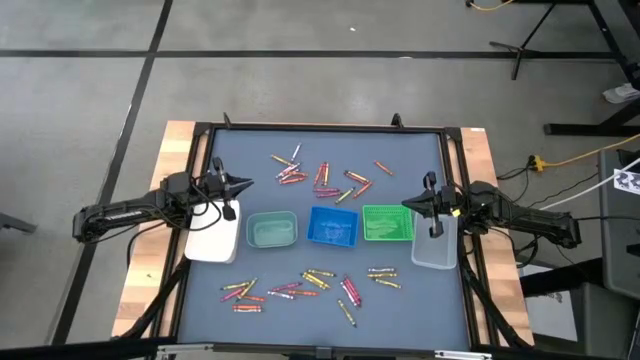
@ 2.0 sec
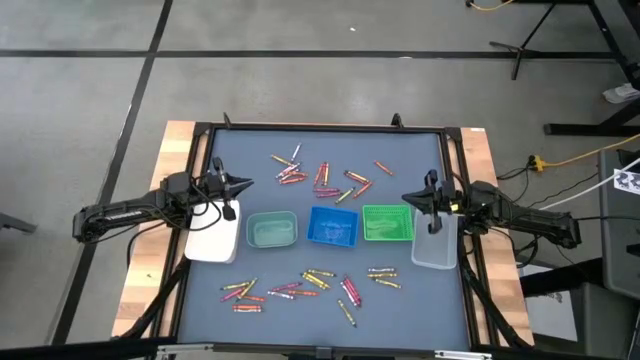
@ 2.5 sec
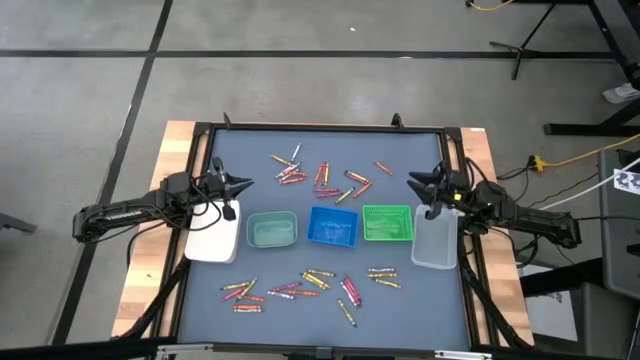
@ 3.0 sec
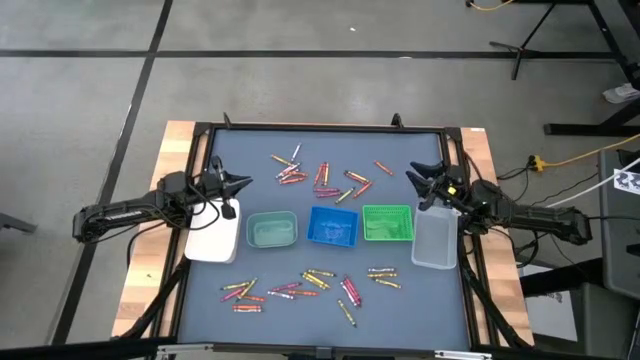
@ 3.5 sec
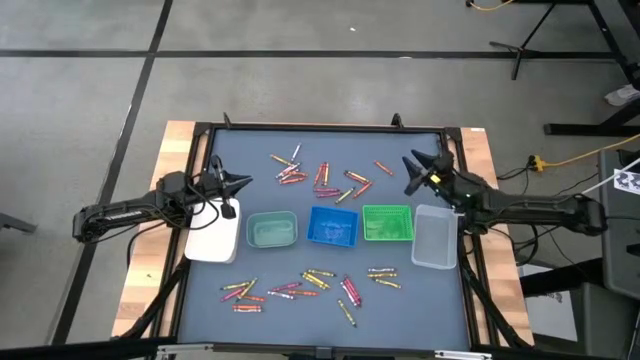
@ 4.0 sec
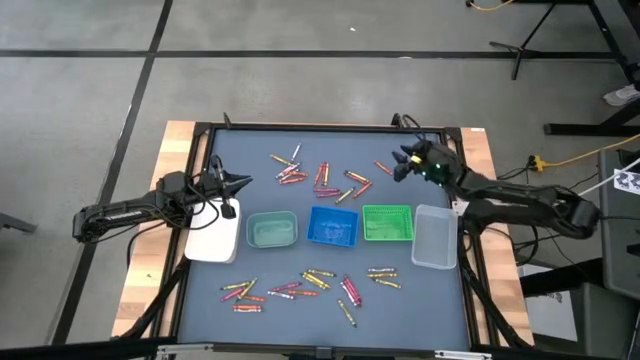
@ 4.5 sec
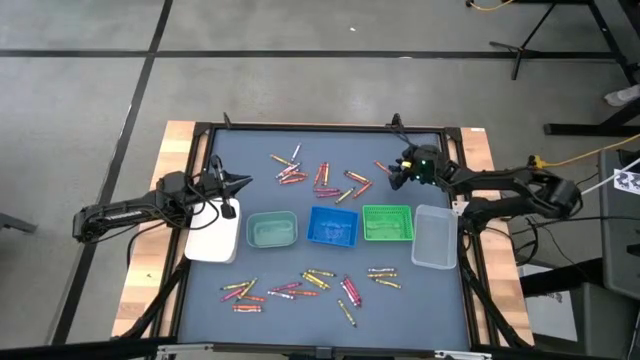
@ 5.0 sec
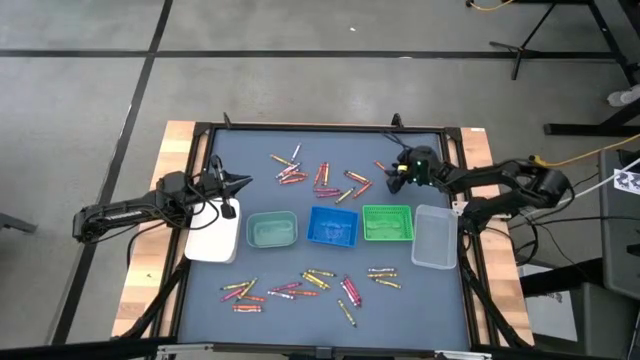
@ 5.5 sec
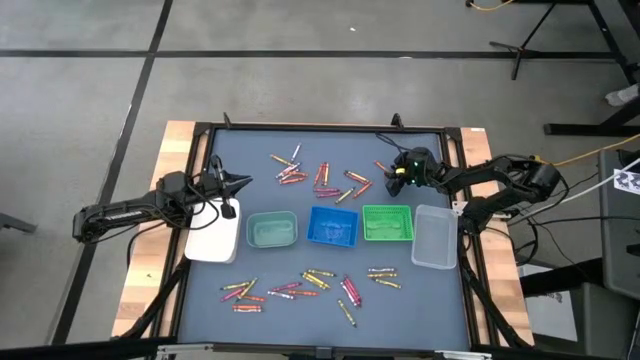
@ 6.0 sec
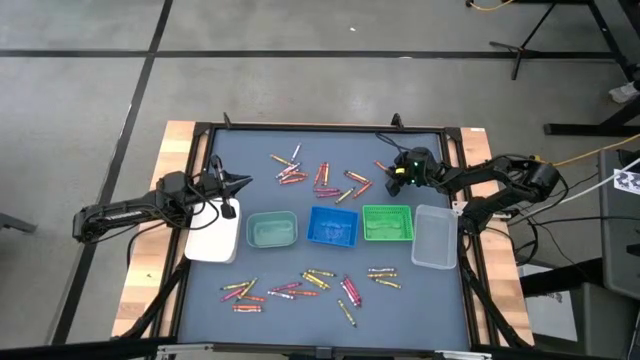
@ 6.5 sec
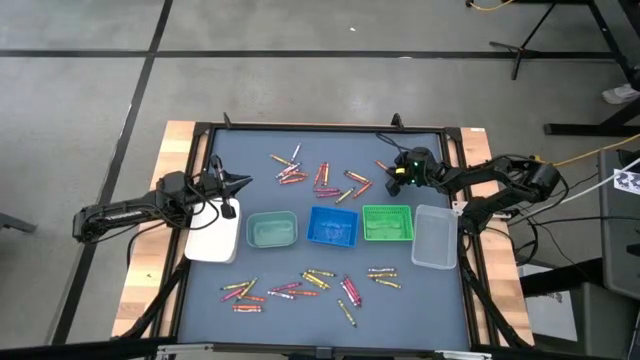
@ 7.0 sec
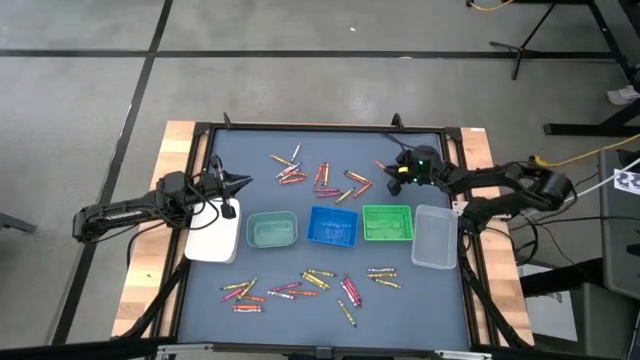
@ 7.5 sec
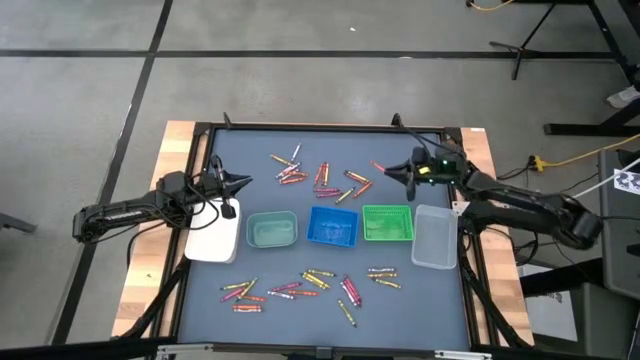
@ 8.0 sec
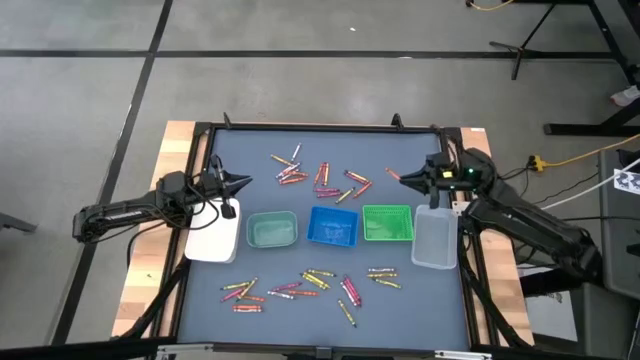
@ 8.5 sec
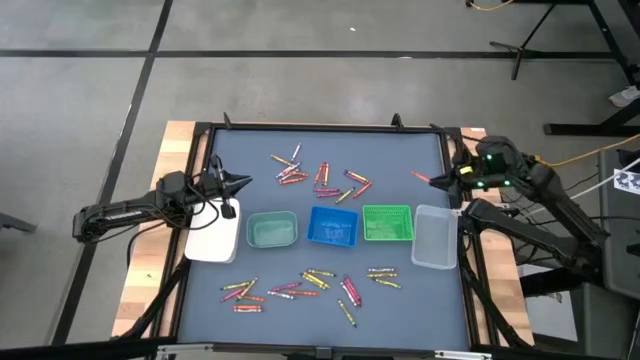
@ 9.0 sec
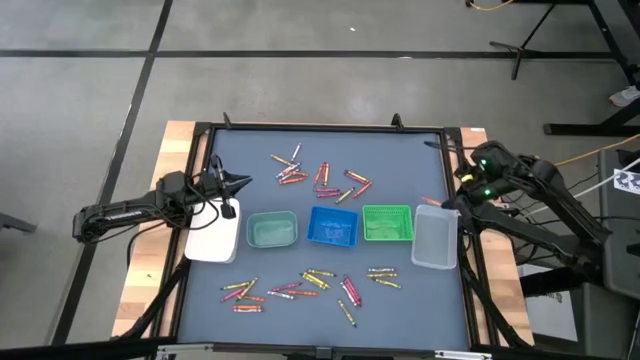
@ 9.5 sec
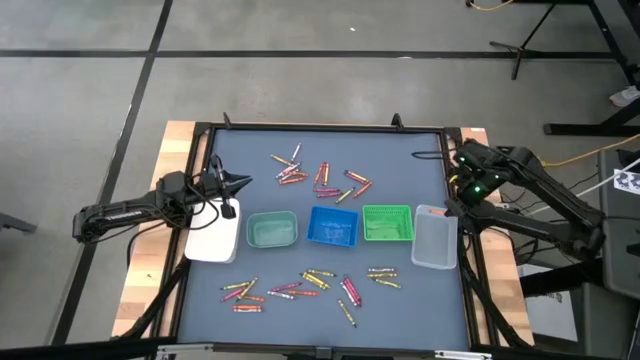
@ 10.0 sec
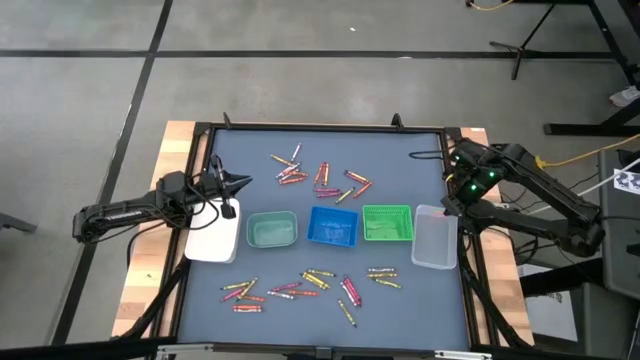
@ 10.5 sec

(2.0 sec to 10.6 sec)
Task: Sort crayons
Put the orange crayon into the transparent bin

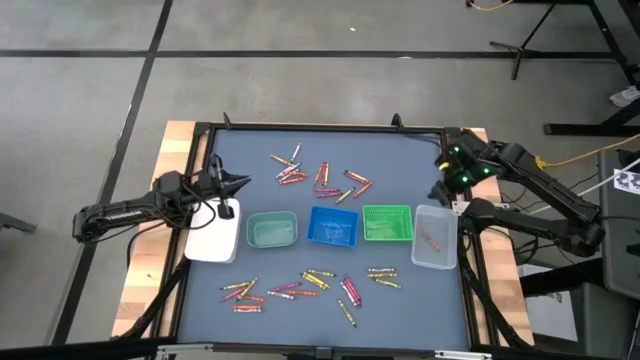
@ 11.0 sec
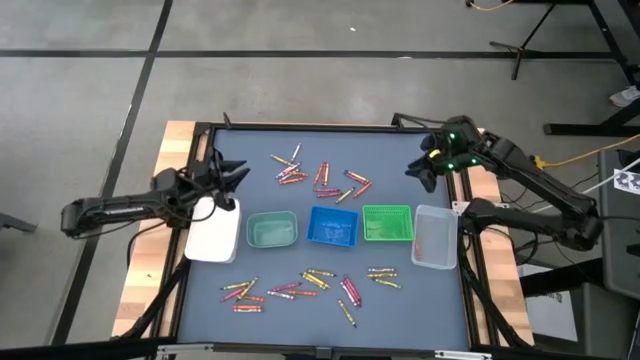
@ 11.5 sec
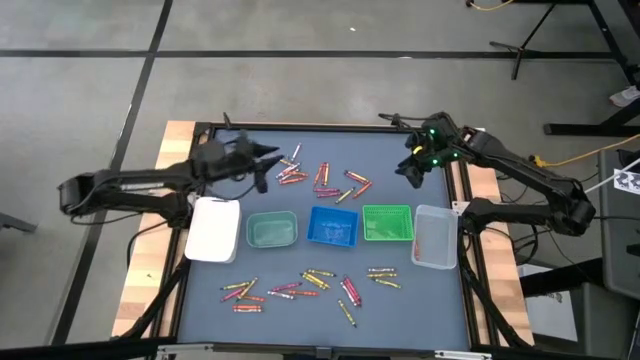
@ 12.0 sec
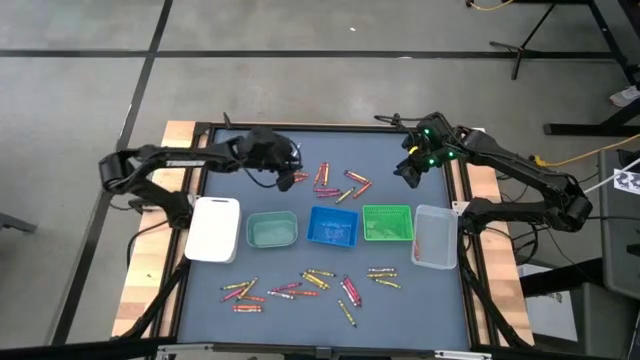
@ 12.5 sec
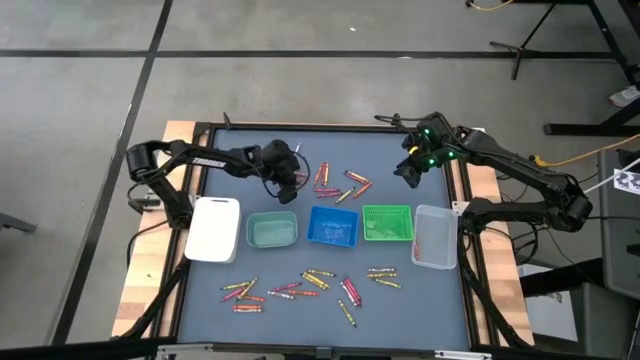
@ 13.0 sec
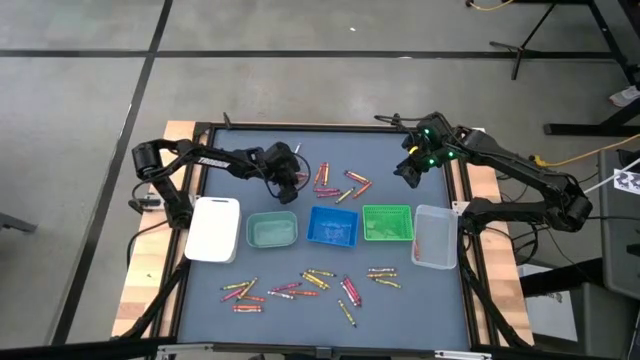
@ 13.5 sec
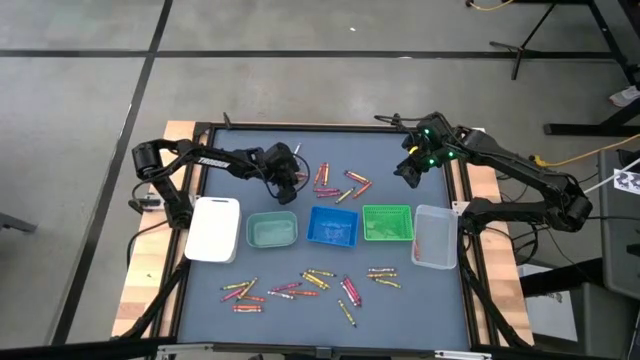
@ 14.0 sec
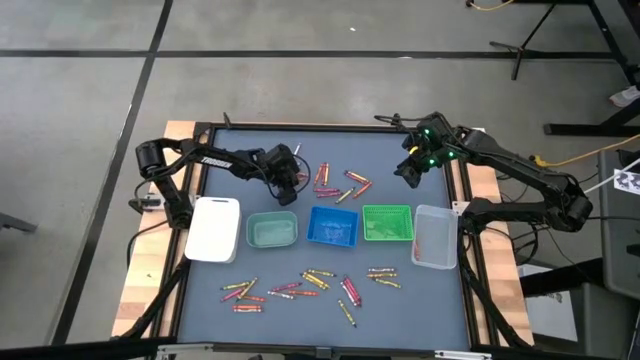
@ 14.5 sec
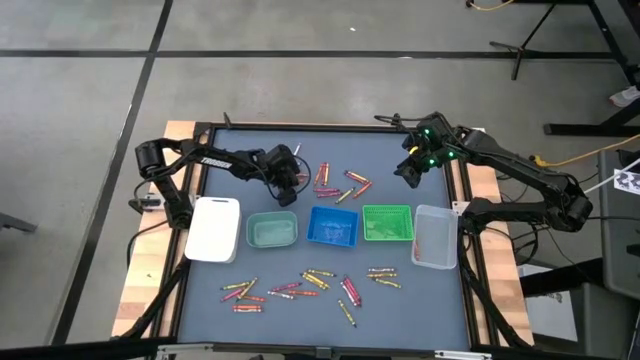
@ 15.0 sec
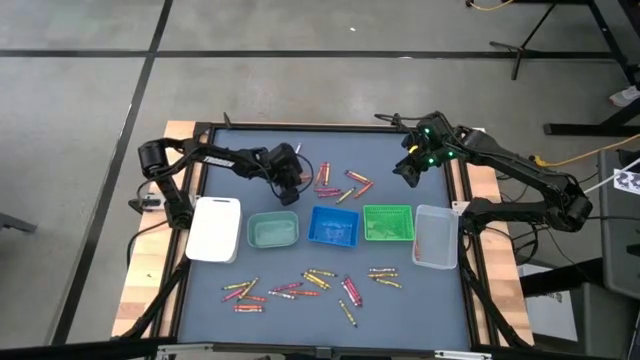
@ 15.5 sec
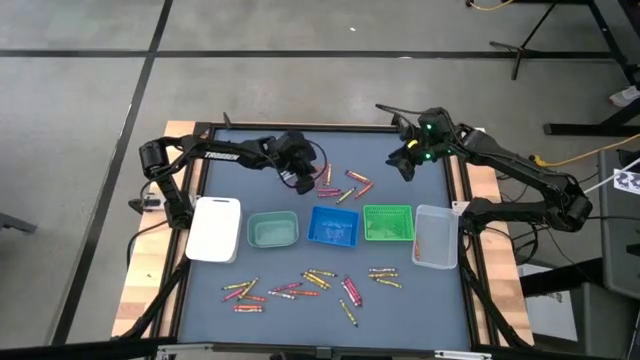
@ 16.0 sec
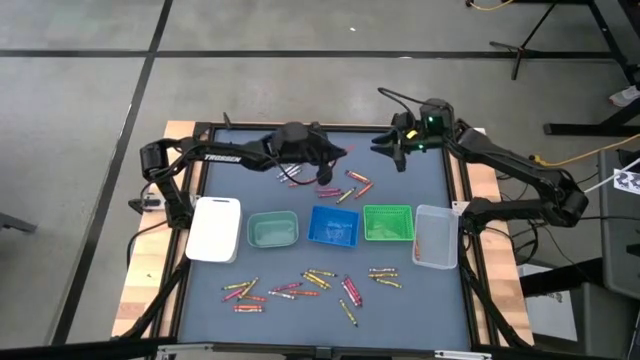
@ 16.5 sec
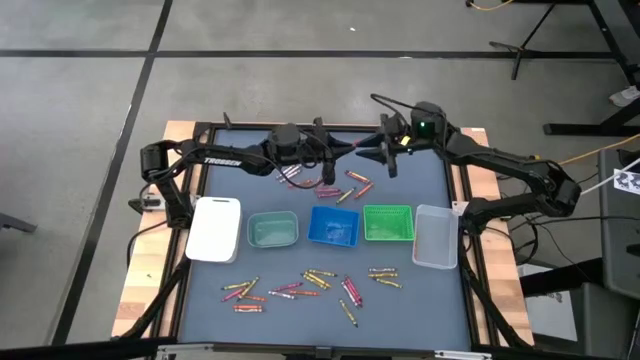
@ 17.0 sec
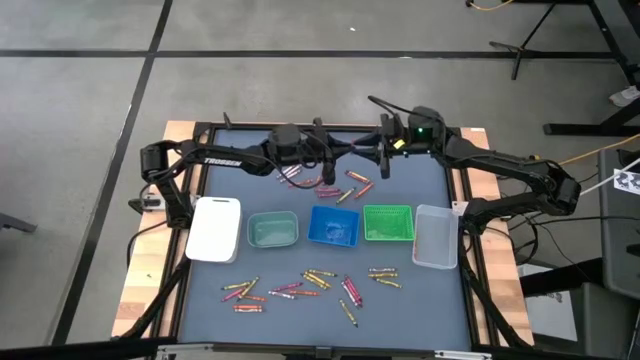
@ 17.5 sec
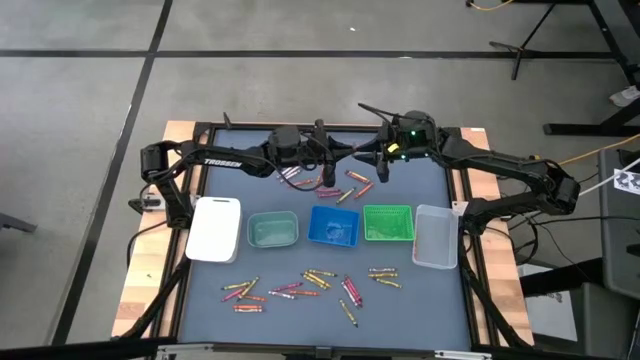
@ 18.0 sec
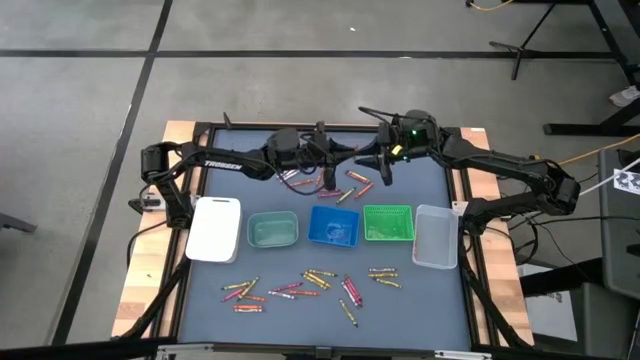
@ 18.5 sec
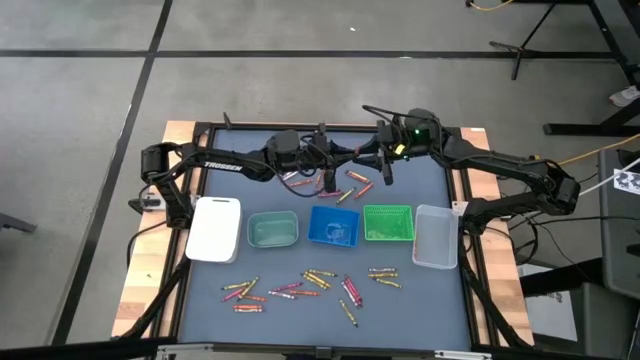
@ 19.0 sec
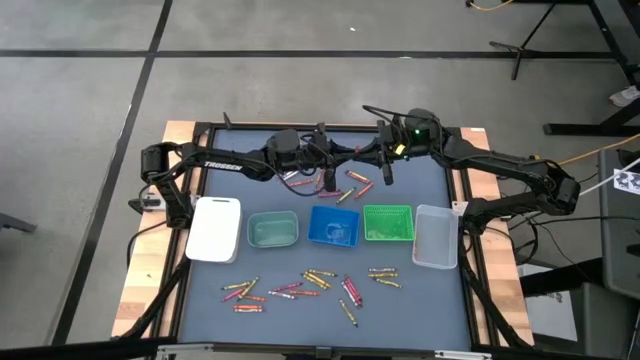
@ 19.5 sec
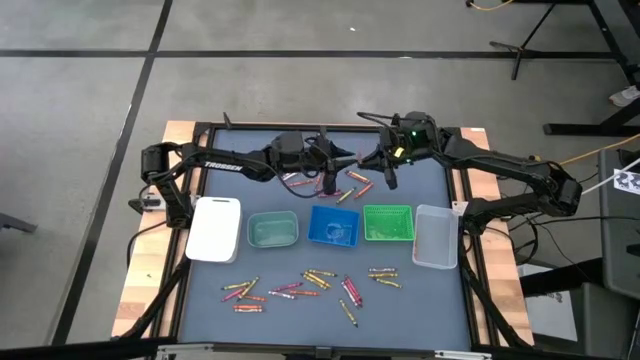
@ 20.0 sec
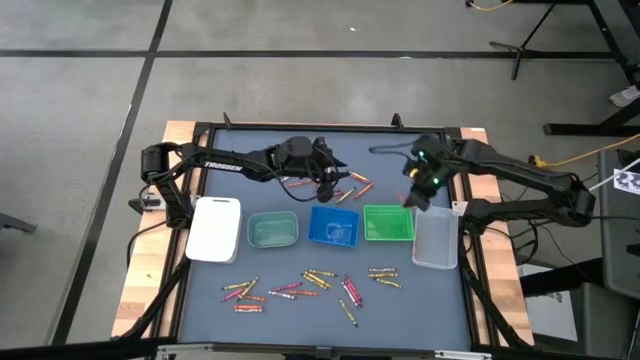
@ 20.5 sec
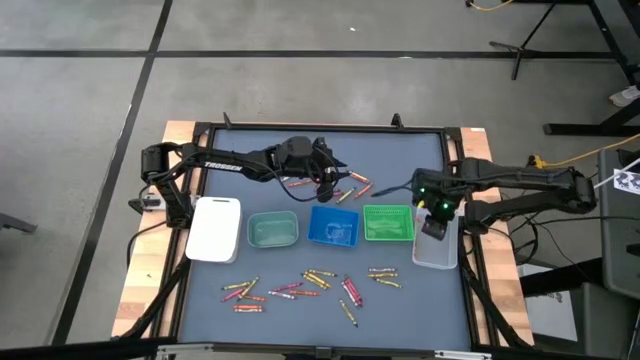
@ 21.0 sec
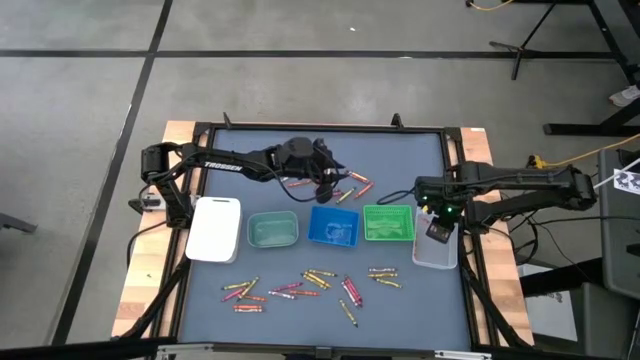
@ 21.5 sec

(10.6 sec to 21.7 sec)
Put the orange crayon into the transparent bin
